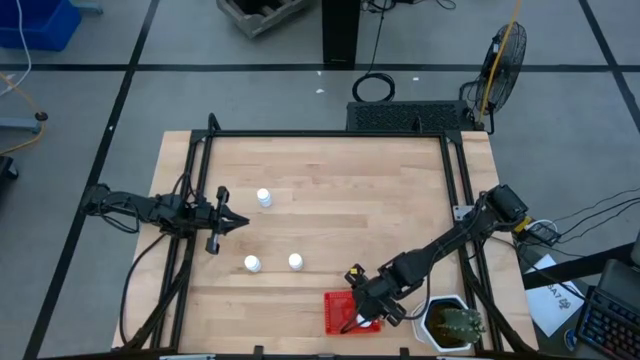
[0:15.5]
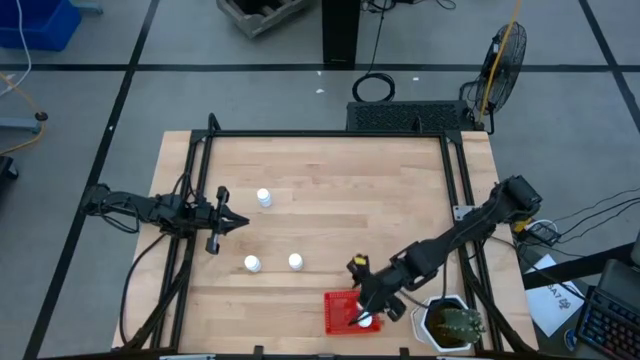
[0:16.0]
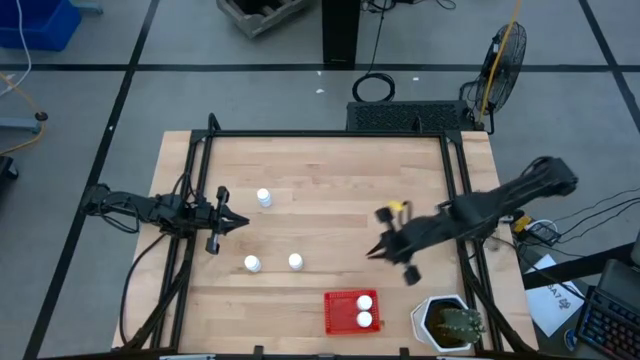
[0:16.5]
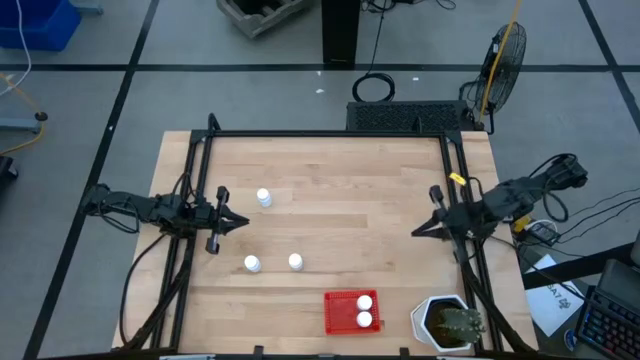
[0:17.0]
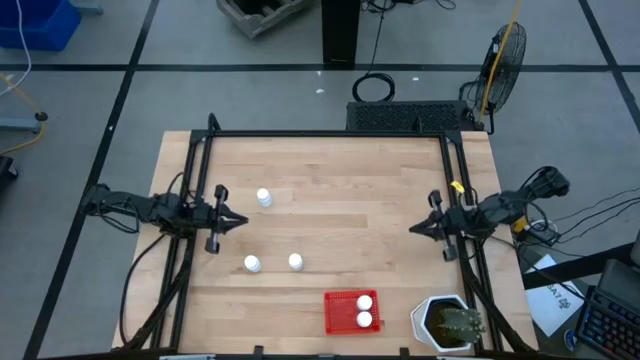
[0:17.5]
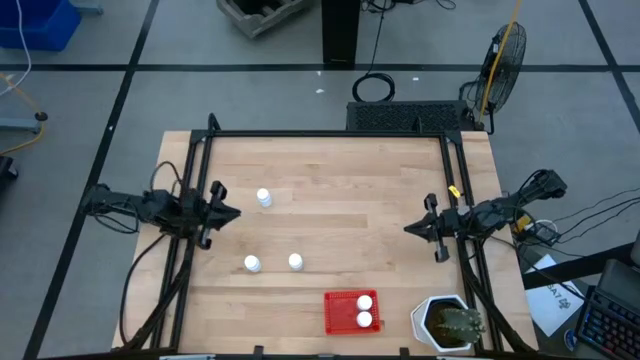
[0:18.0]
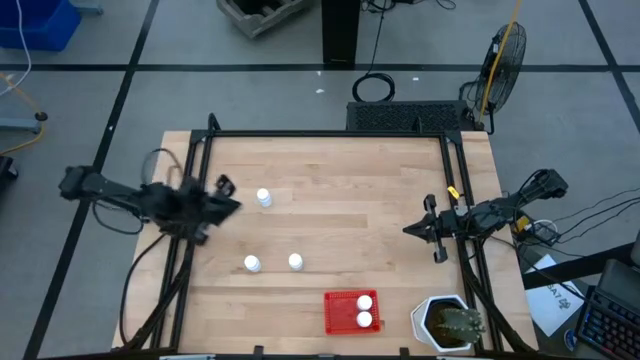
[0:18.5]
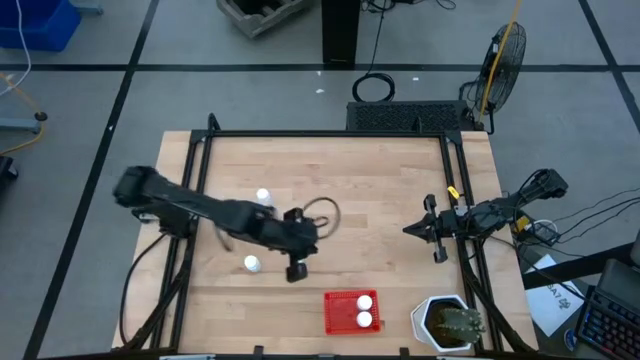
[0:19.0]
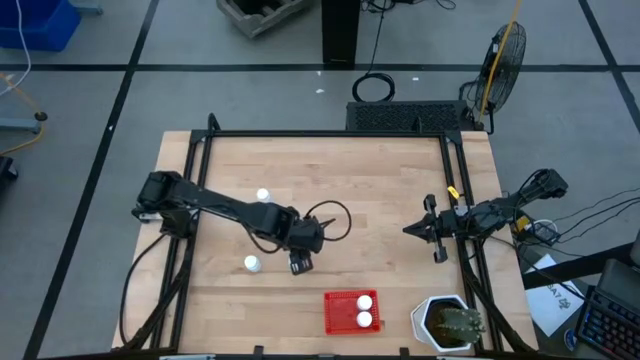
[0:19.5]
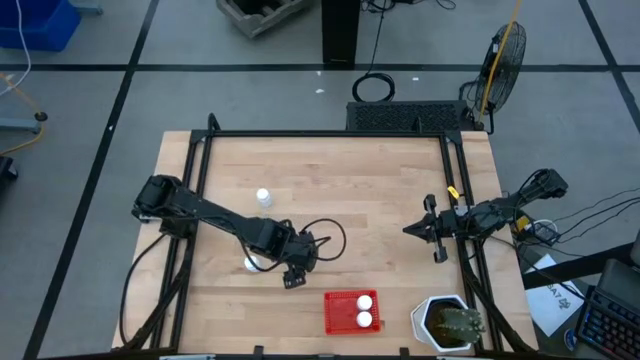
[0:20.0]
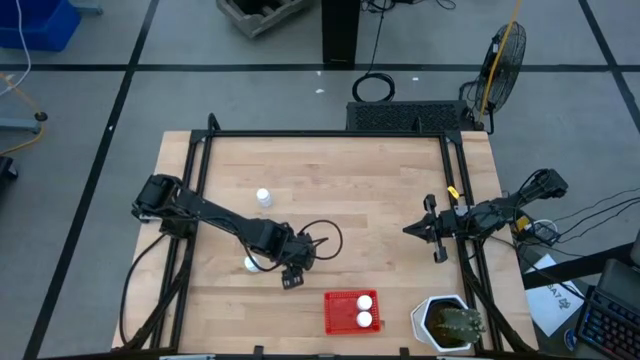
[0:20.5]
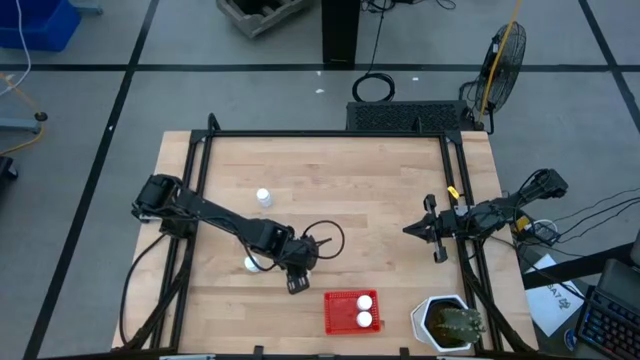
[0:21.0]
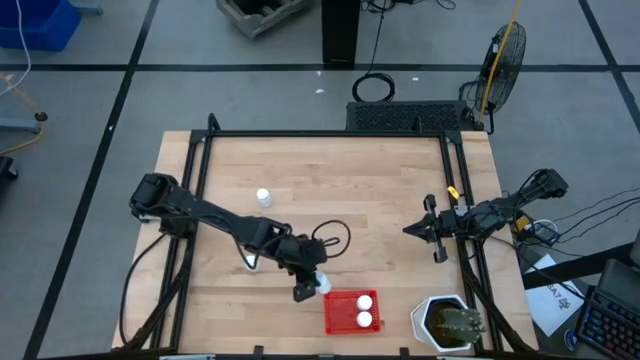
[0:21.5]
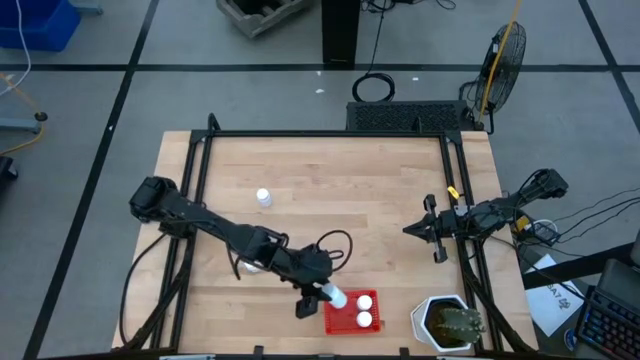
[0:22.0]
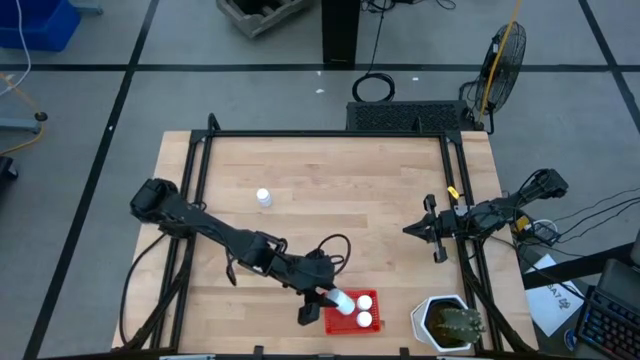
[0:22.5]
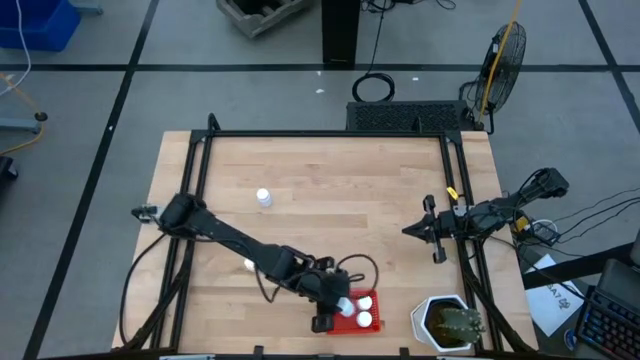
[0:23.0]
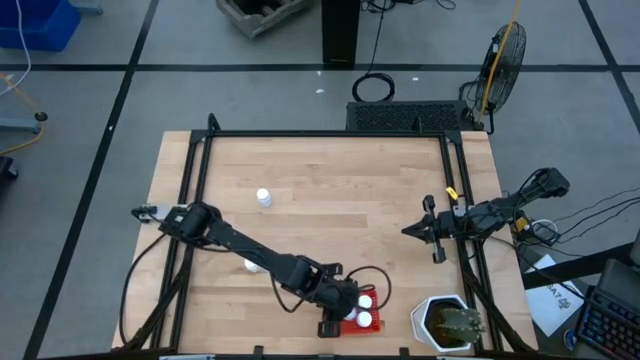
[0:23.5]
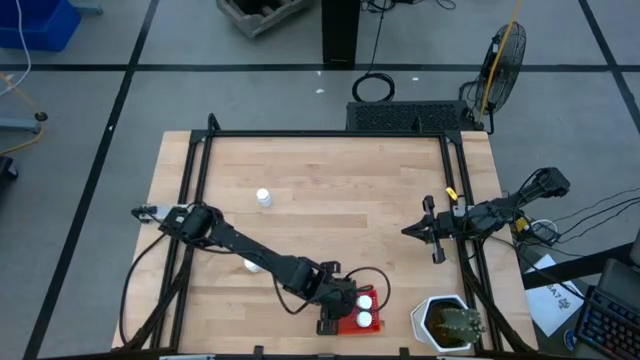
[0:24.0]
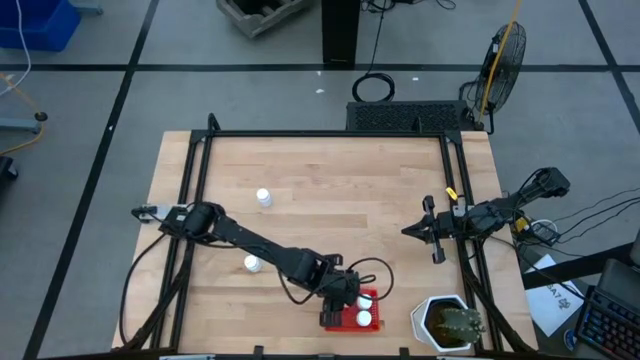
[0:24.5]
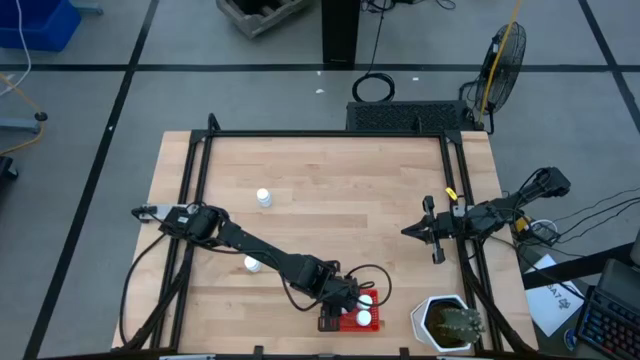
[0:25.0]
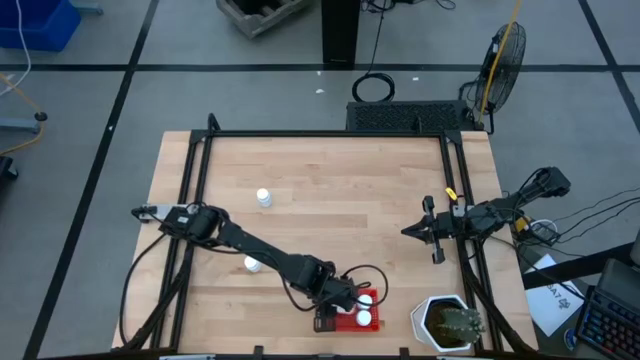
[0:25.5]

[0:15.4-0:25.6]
Task: Pick and place pill bottles into a basket
Put the white pill bottle into the red basket

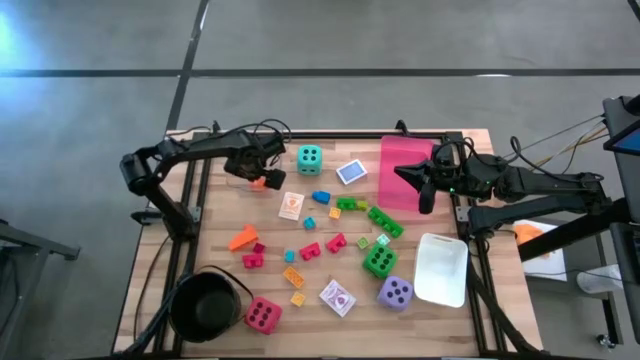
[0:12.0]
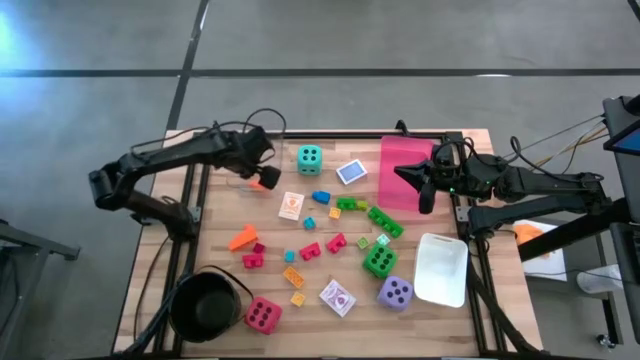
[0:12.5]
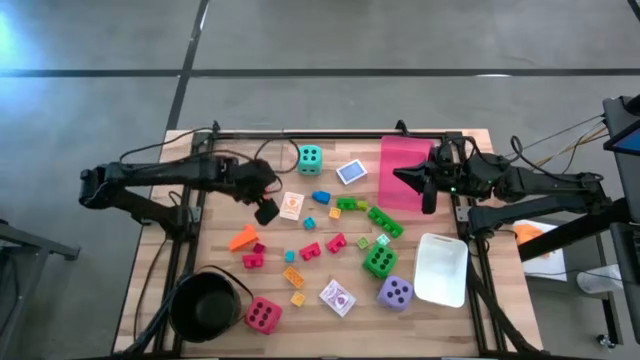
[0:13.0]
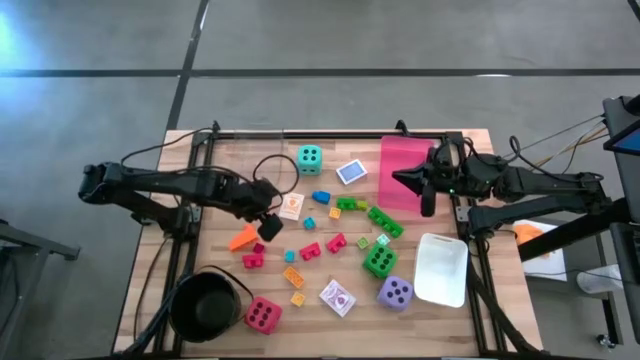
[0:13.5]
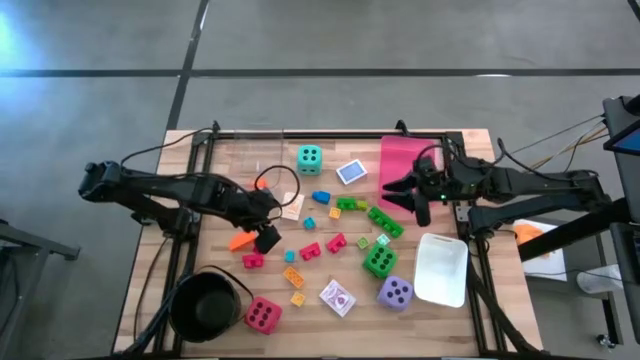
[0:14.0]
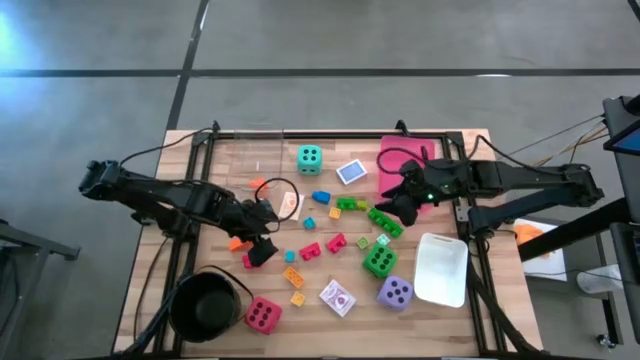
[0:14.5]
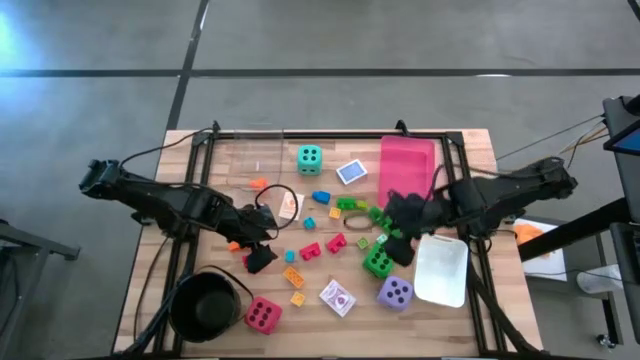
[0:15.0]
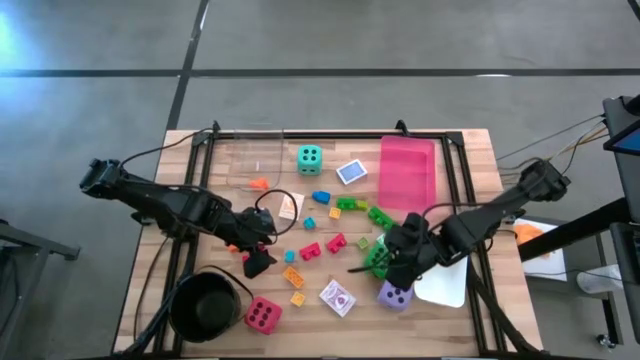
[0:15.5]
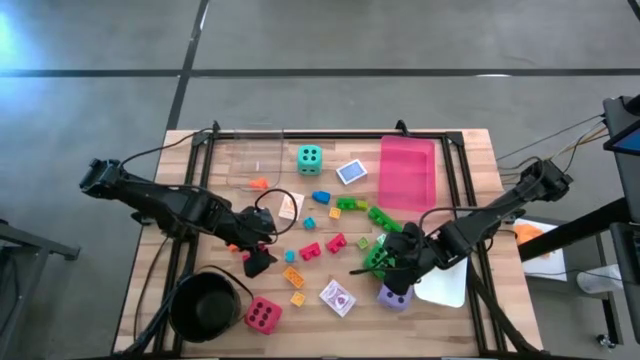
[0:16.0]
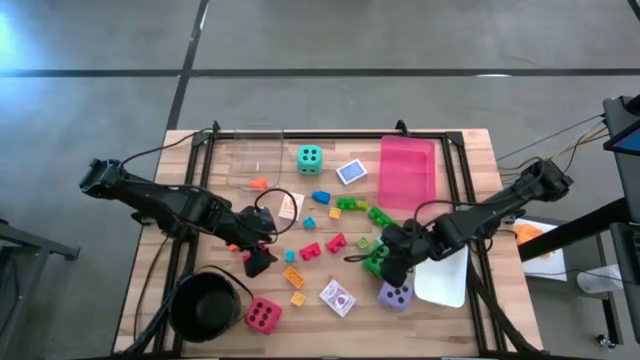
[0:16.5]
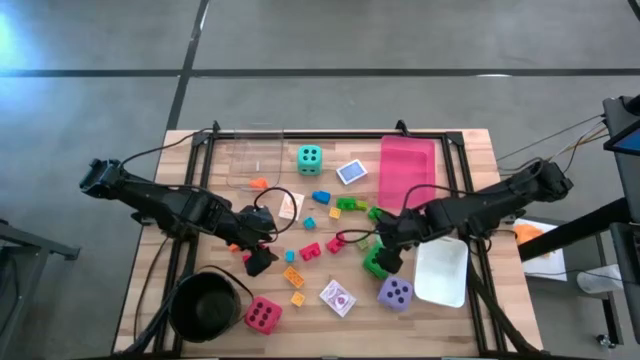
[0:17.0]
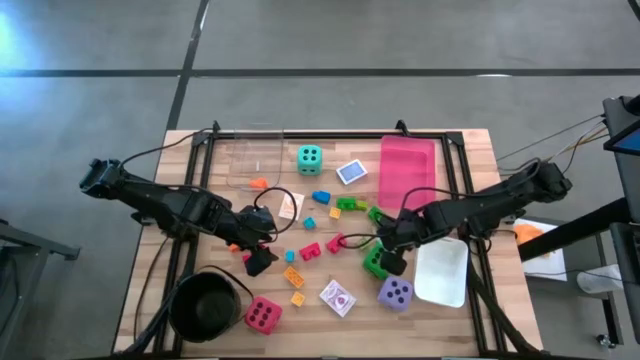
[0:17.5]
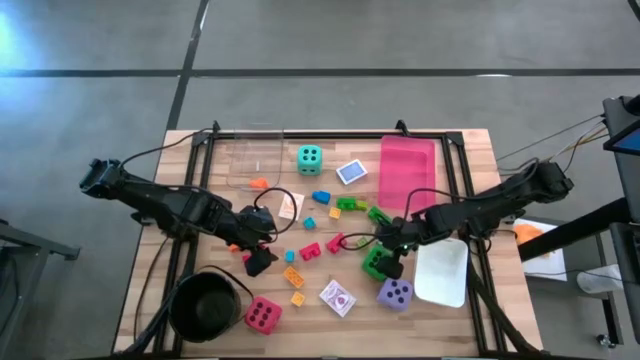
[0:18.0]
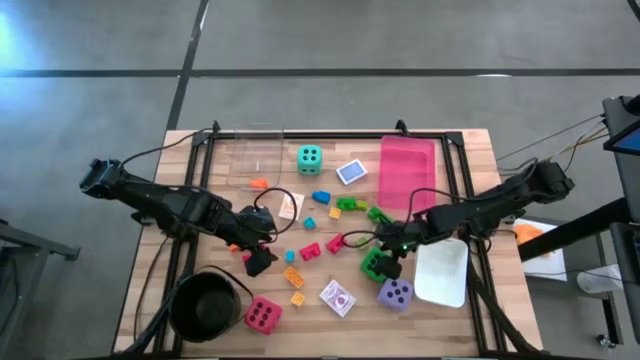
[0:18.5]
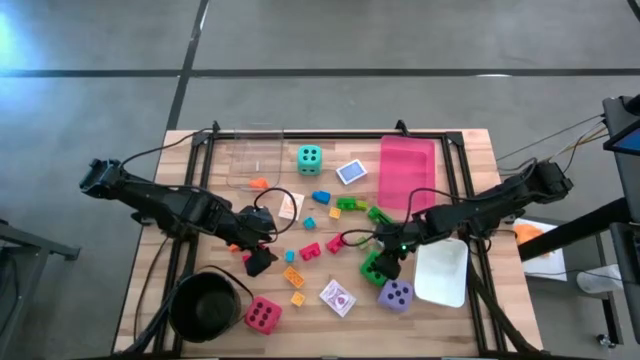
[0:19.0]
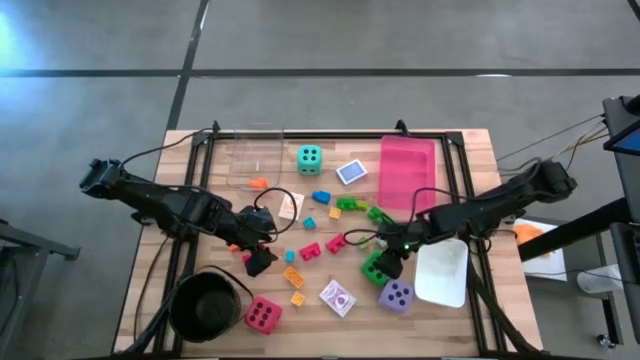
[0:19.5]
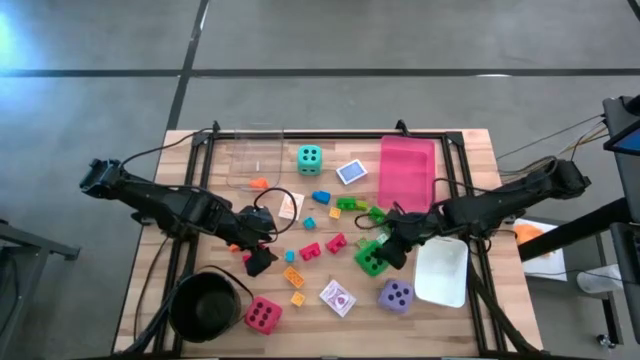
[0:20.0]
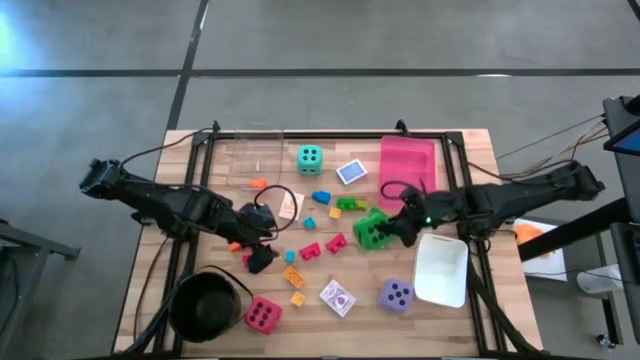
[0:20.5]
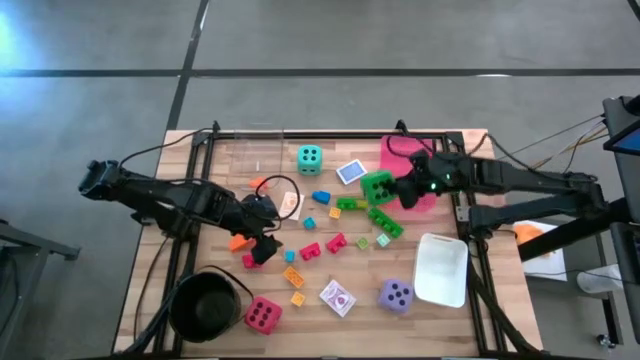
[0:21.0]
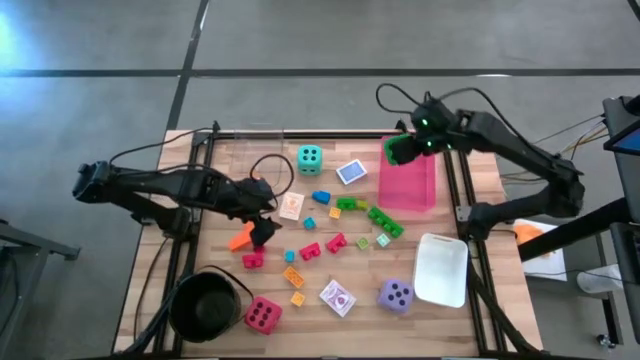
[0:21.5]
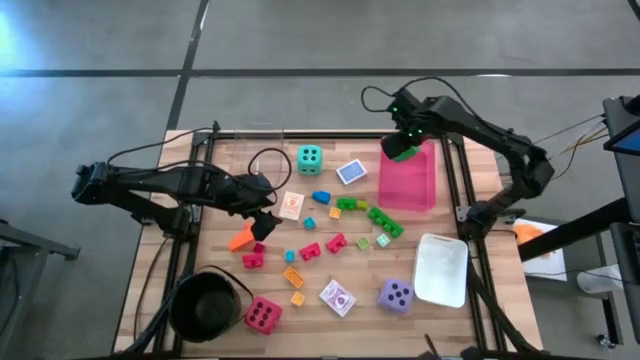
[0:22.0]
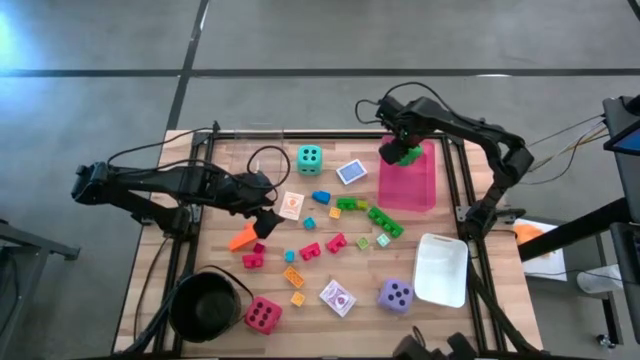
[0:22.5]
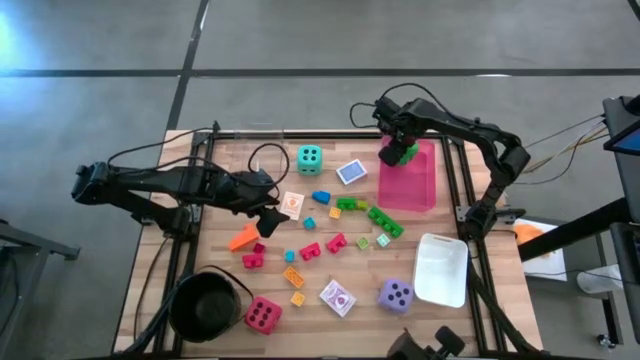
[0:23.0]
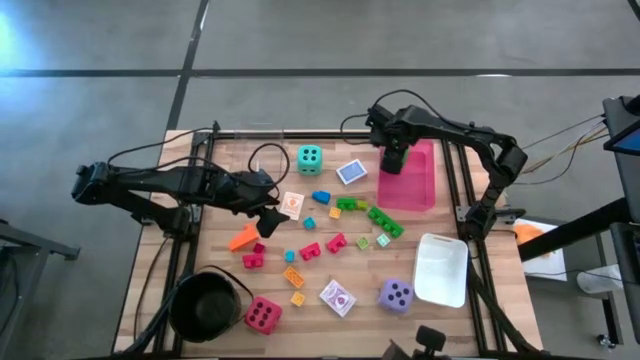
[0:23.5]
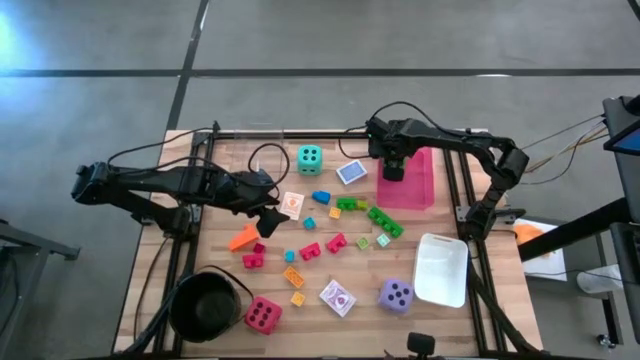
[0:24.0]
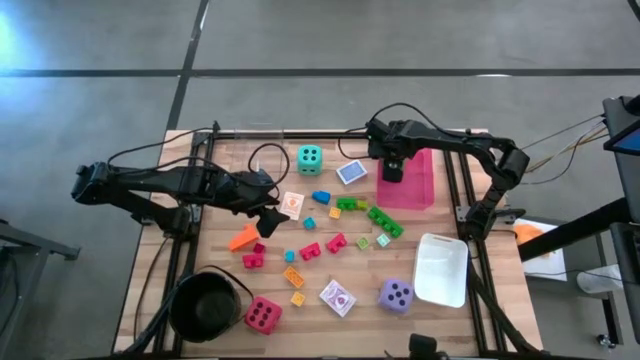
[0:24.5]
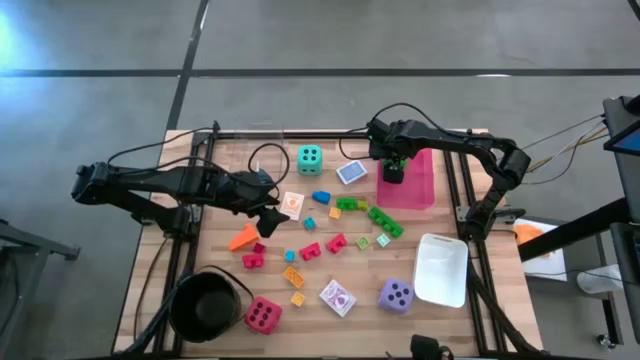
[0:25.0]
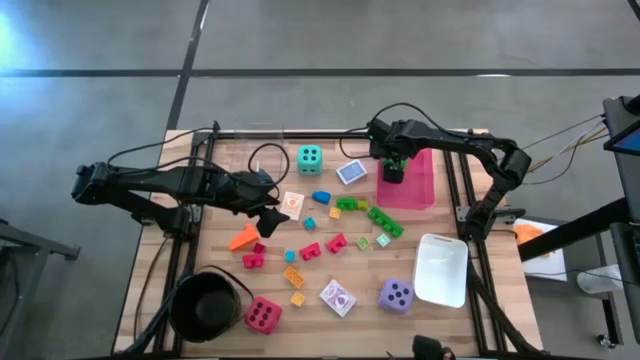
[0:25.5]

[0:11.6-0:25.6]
Task: Pick & Place Toys
Put the green die into the pink bin
